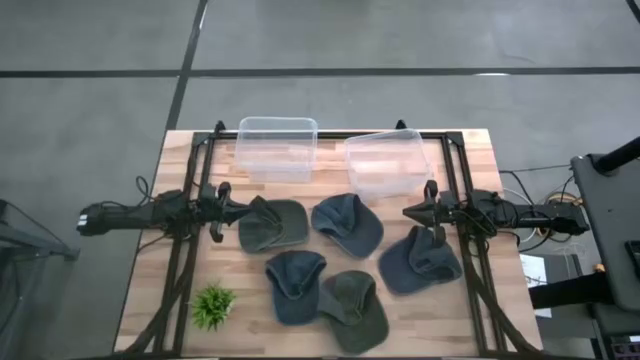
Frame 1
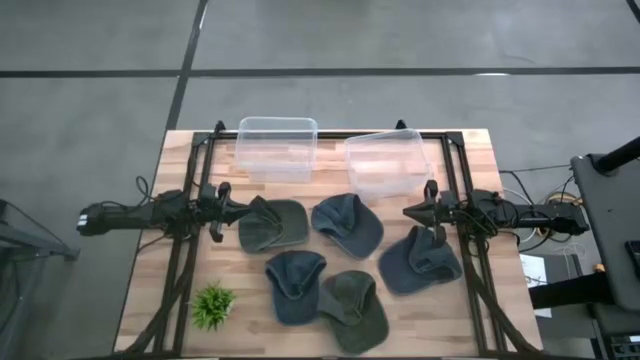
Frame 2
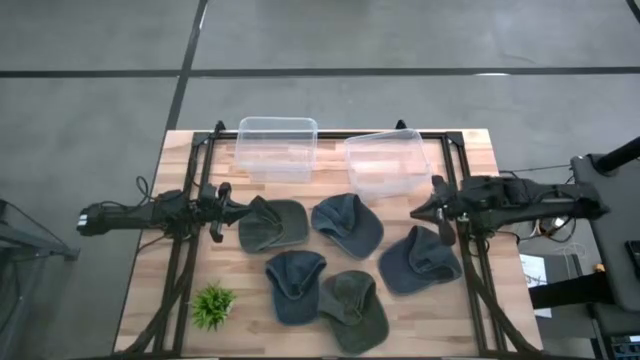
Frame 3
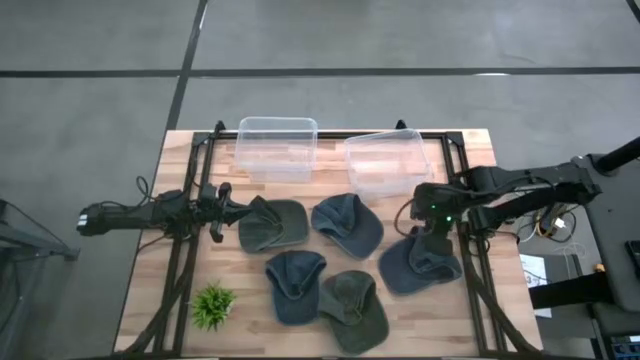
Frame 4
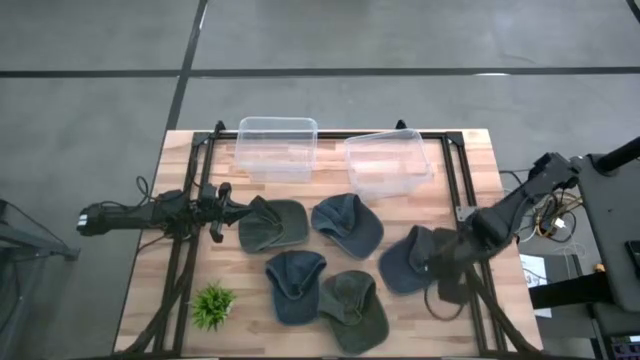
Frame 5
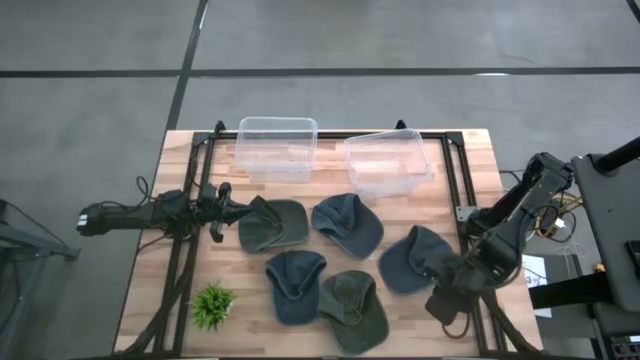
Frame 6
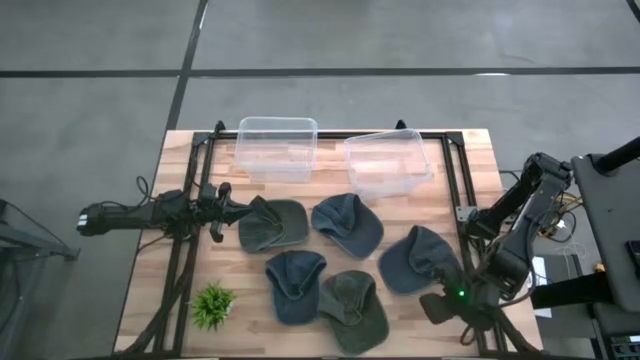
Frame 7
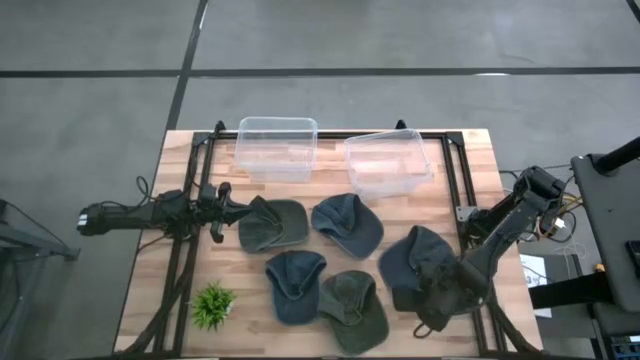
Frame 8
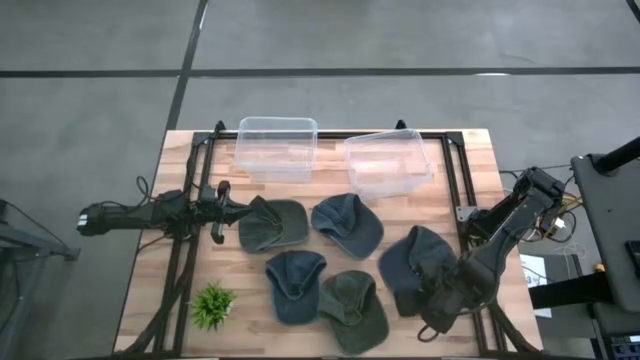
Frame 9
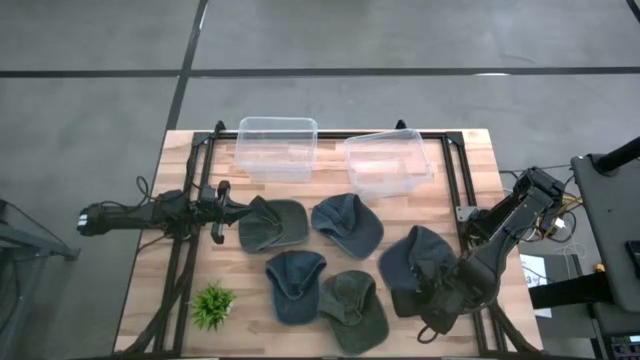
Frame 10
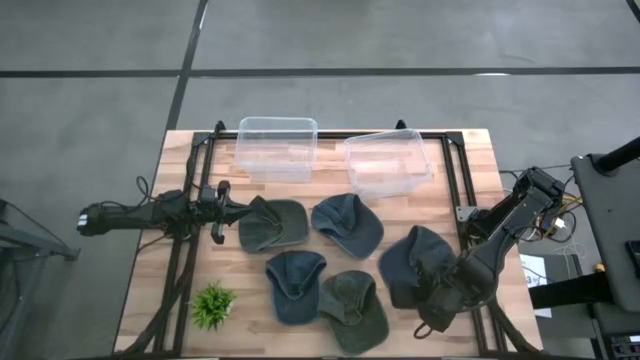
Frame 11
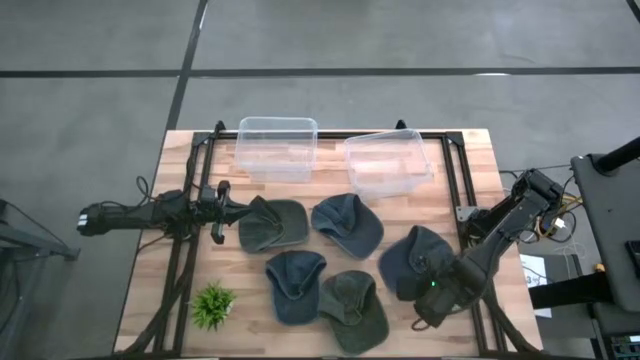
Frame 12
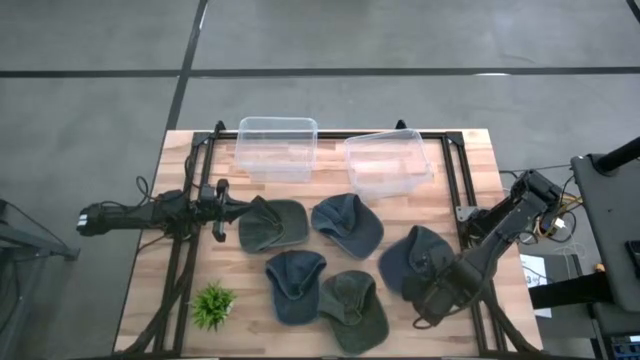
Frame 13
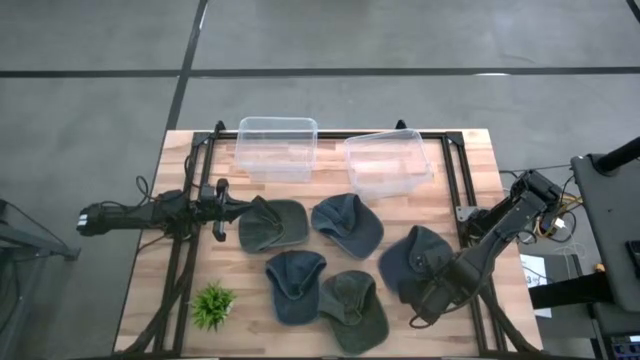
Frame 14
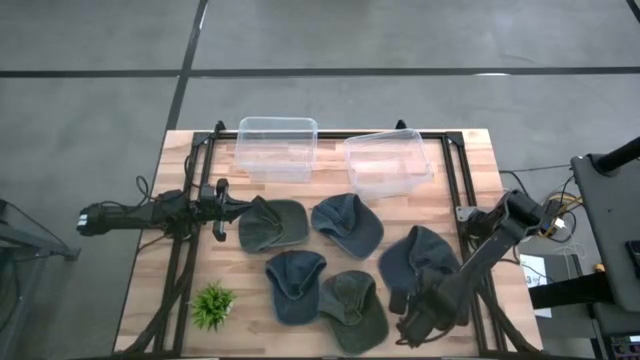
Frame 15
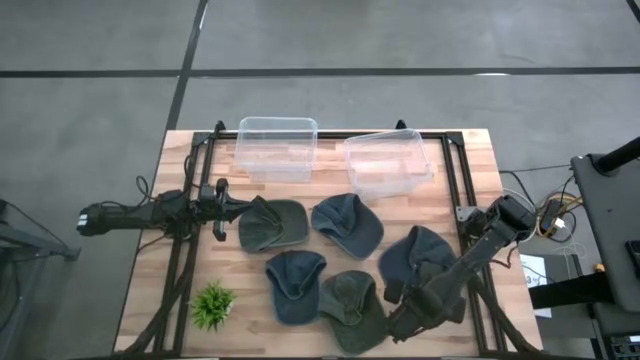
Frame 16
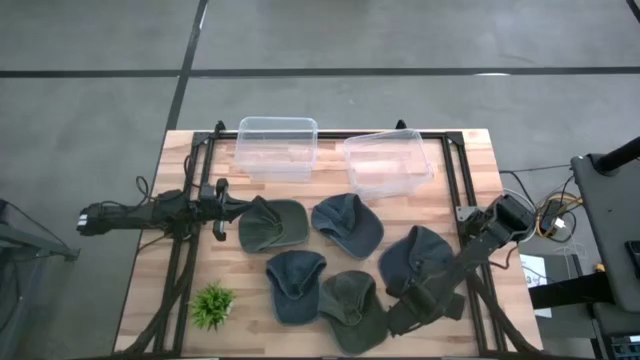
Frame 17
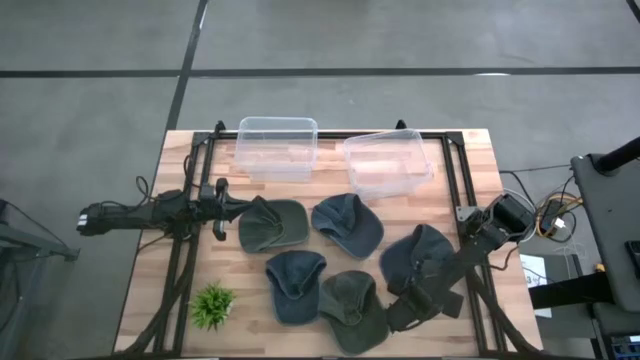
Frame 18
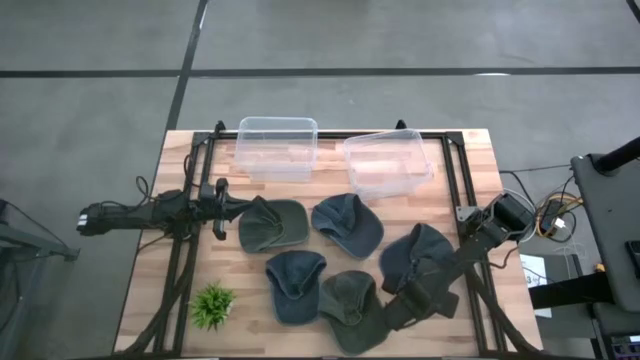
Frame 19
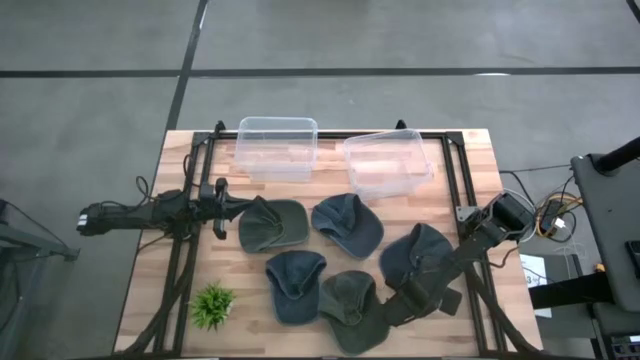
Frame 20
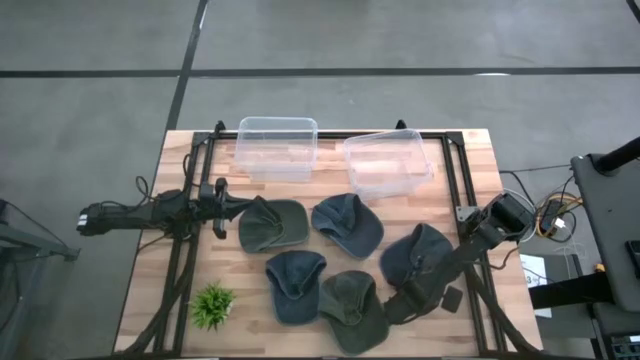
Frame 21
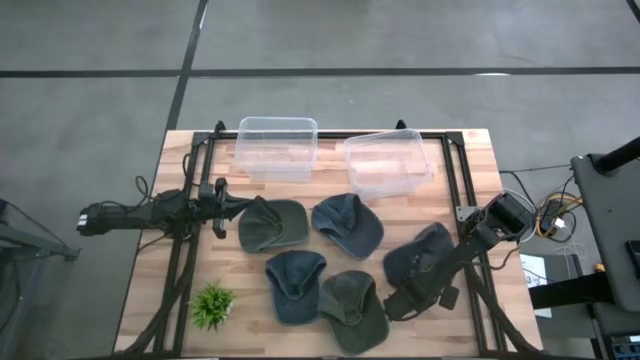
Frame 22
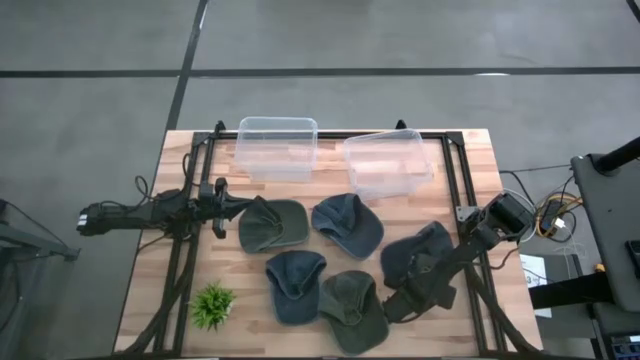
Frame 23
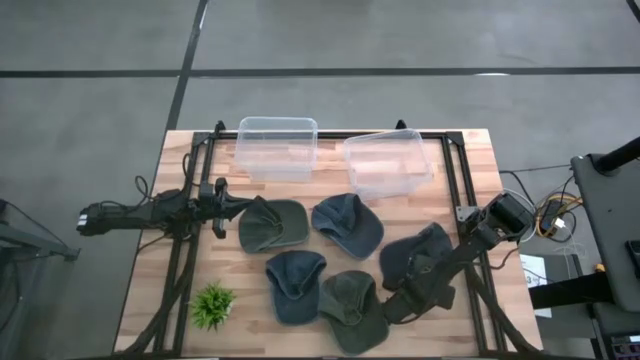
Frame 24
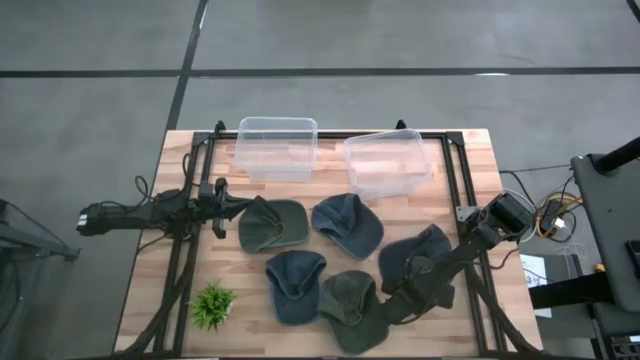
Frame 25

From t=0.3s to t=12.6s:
Task: Pick & Place hat
Put the middle blue cap into the right transparent bin

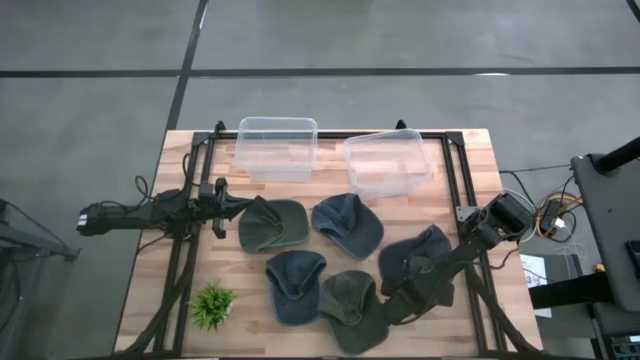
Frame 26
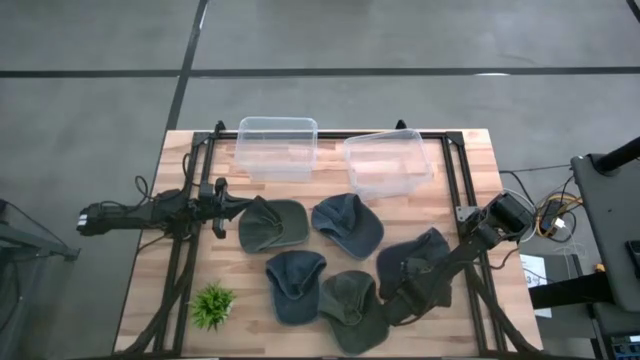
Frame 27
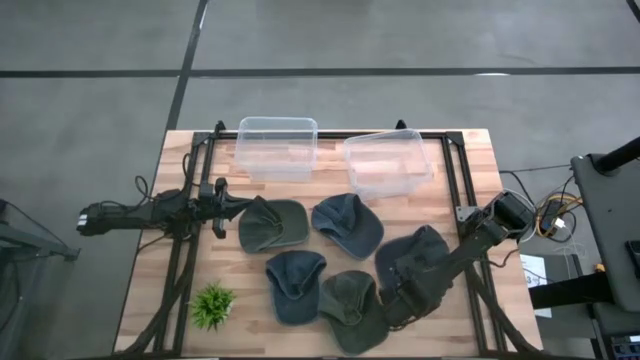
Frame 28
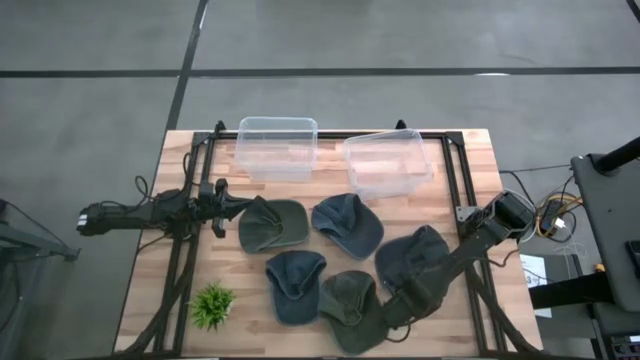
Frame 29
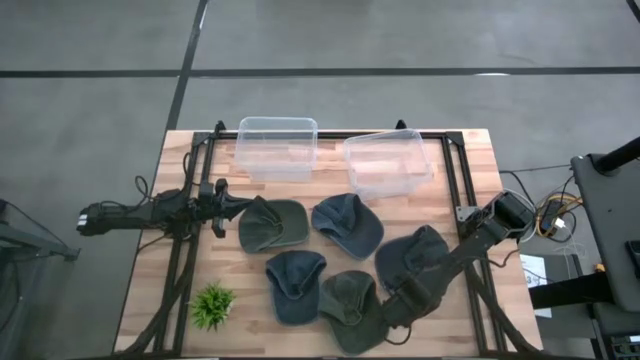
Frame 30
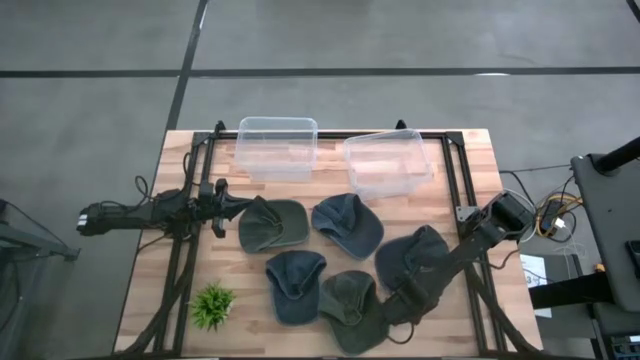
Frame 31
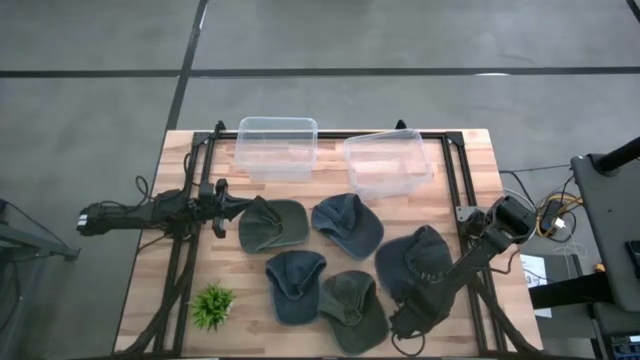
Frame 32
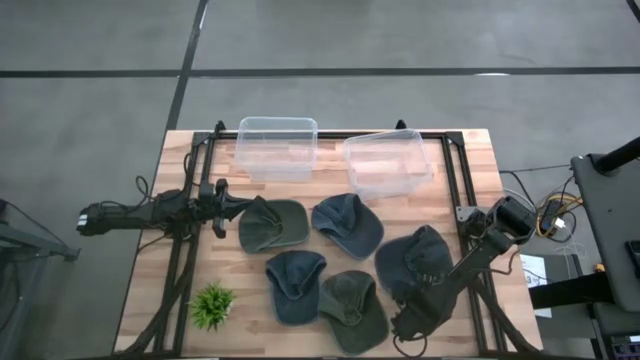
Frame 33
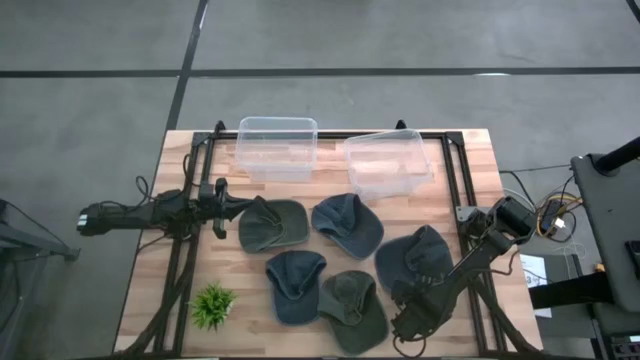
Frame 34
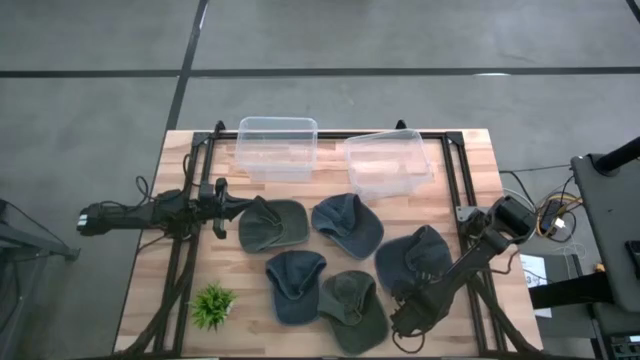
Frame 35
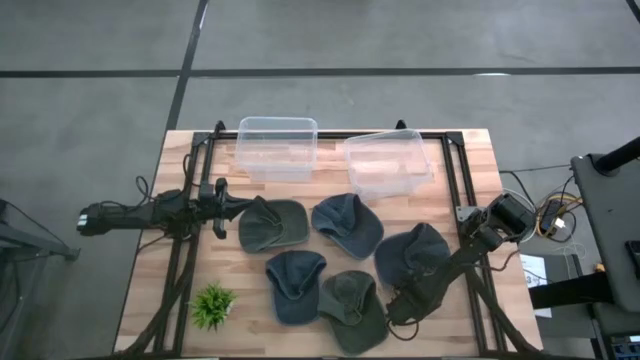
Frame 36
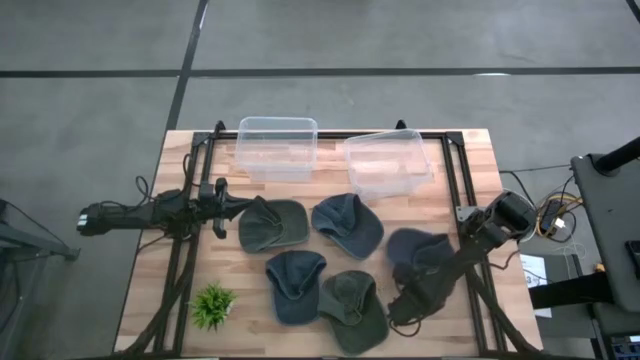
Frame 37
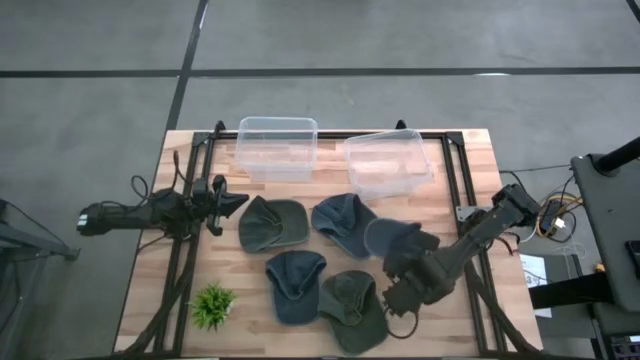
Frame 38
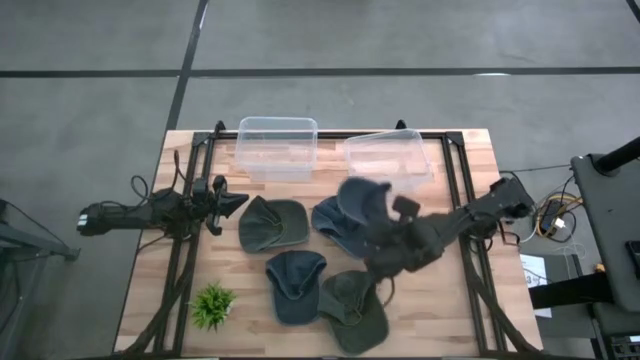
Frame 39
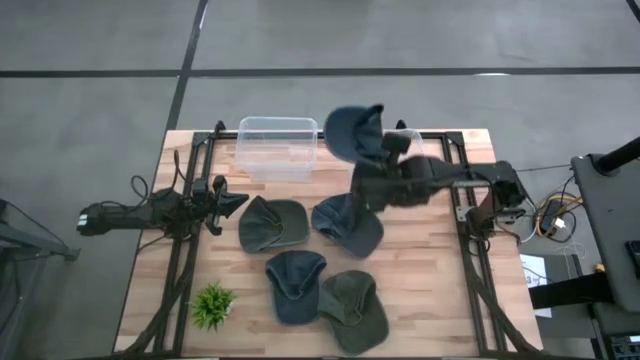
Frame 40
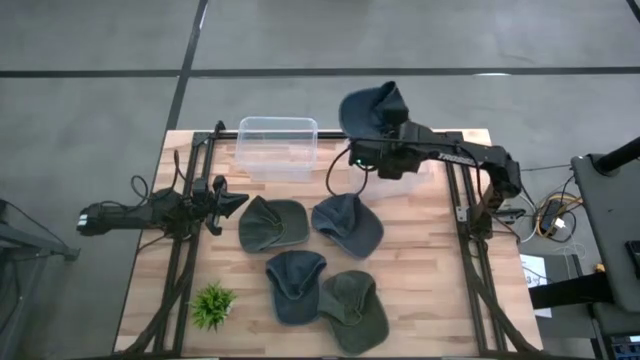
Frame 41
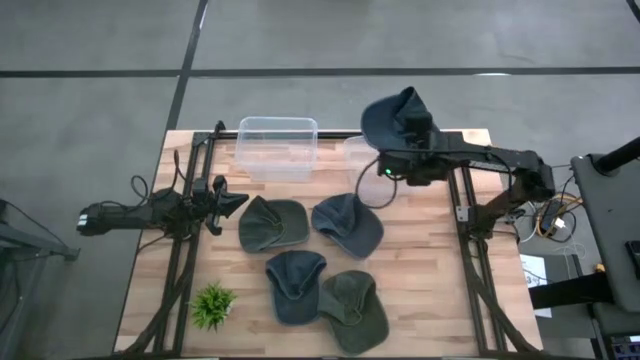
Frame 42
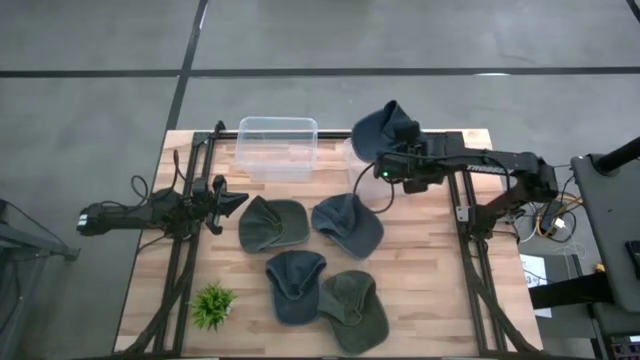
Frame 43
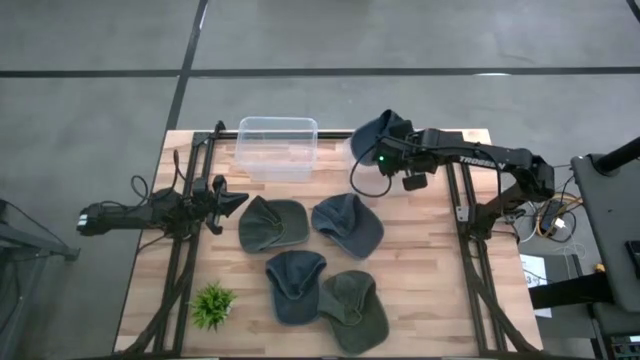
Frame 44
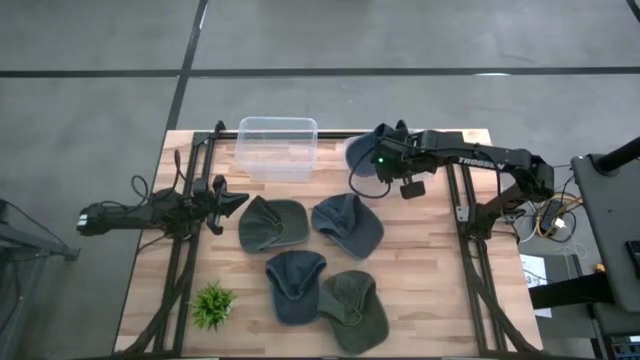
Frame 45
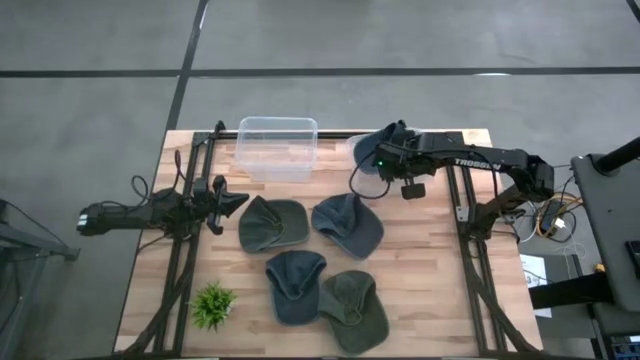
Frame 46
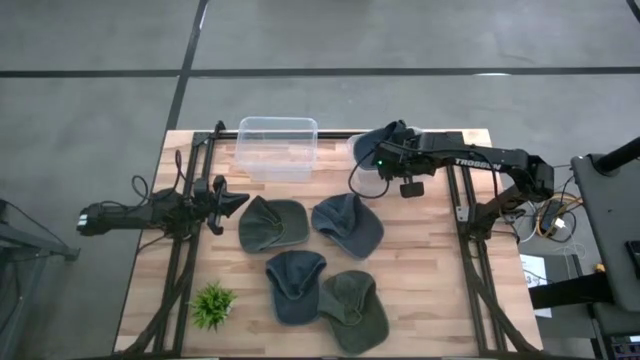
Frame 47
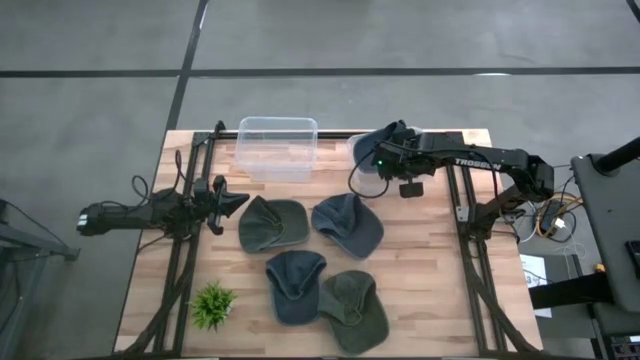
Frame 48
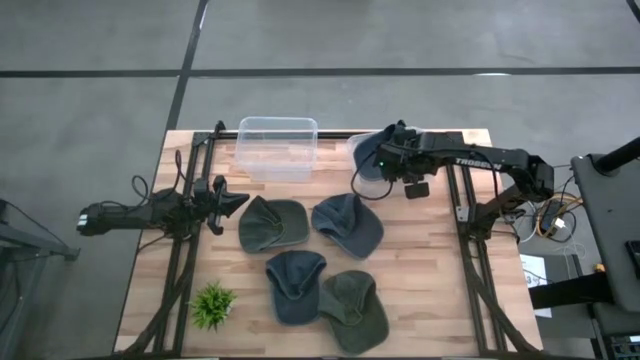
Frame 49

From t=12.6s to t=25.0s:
Put the middle blue cap into the right transparent bin
